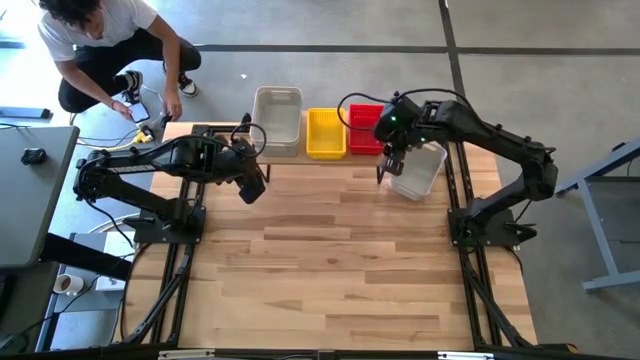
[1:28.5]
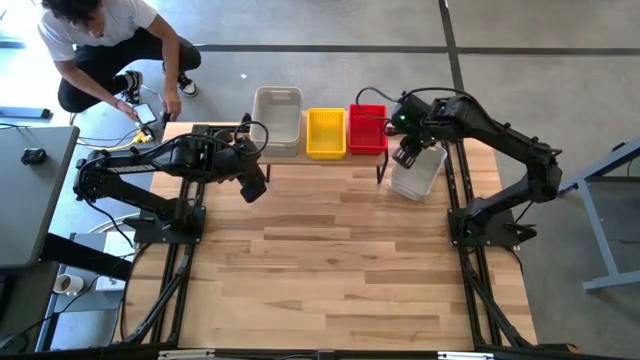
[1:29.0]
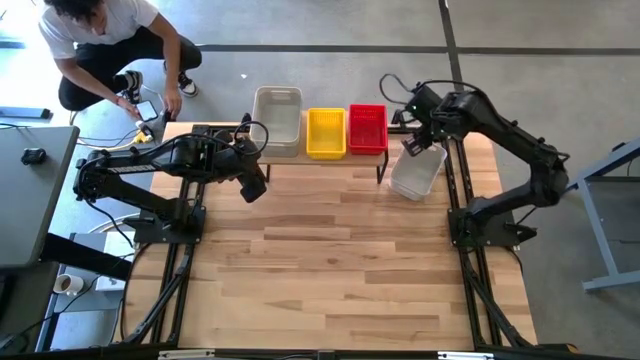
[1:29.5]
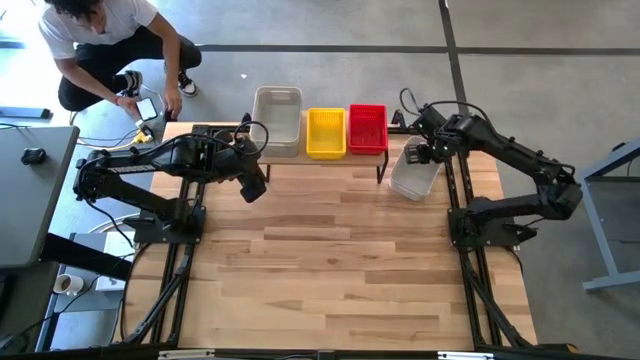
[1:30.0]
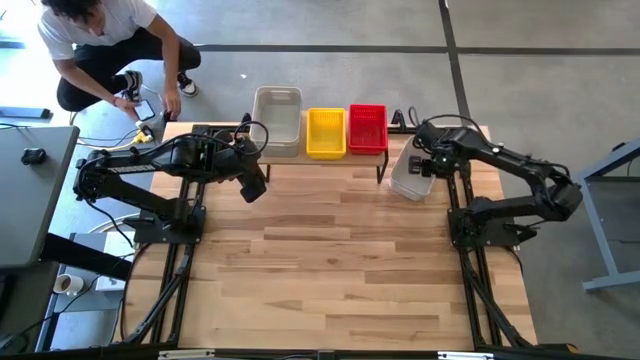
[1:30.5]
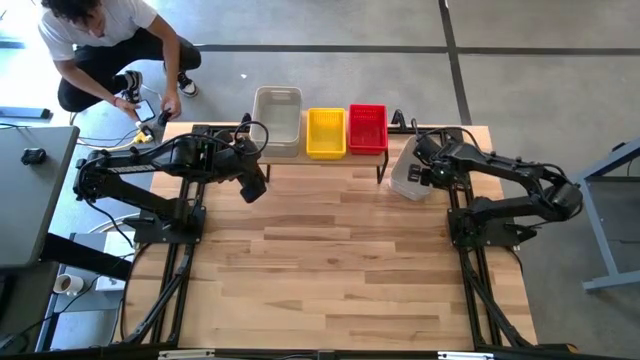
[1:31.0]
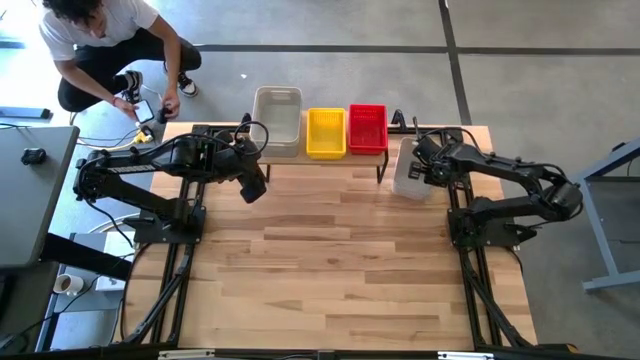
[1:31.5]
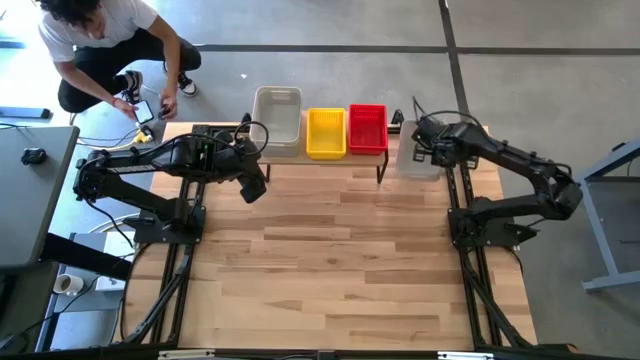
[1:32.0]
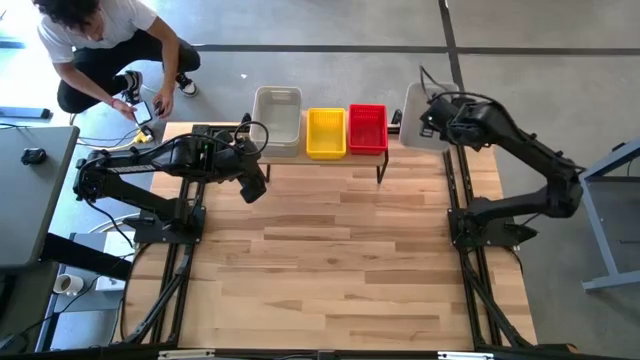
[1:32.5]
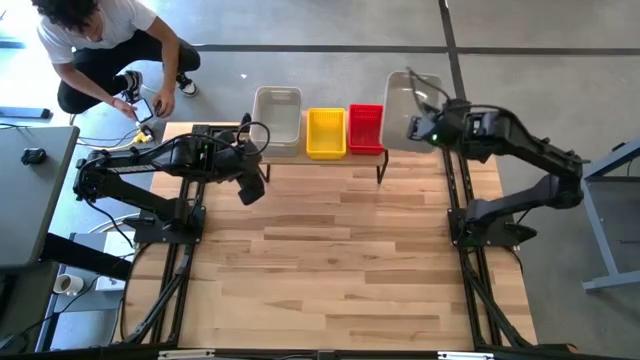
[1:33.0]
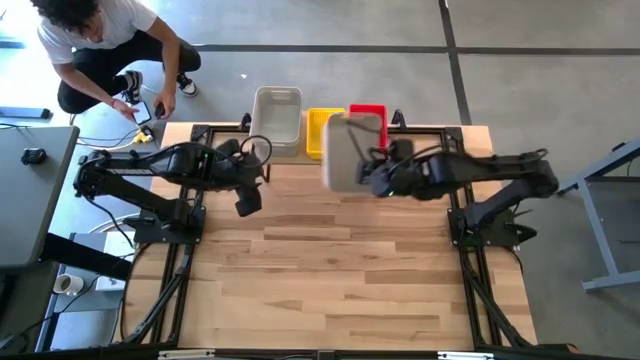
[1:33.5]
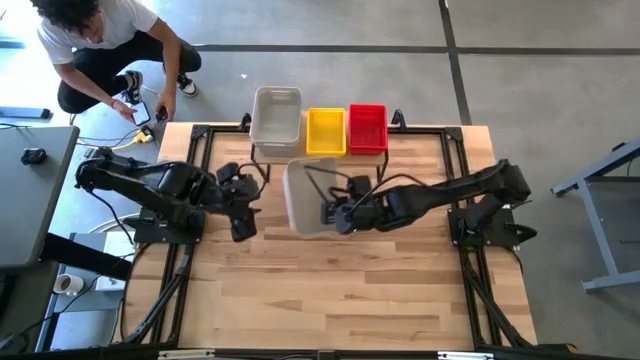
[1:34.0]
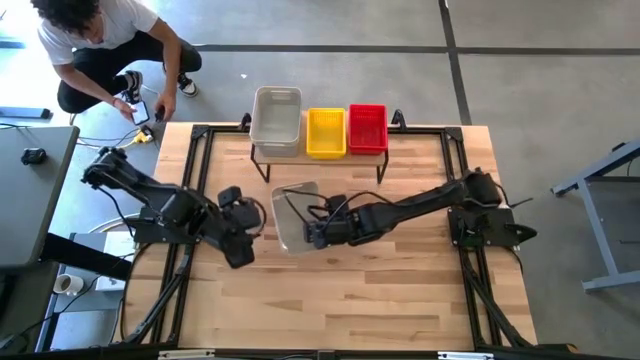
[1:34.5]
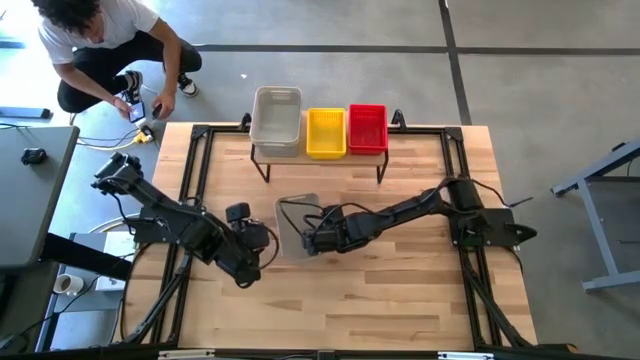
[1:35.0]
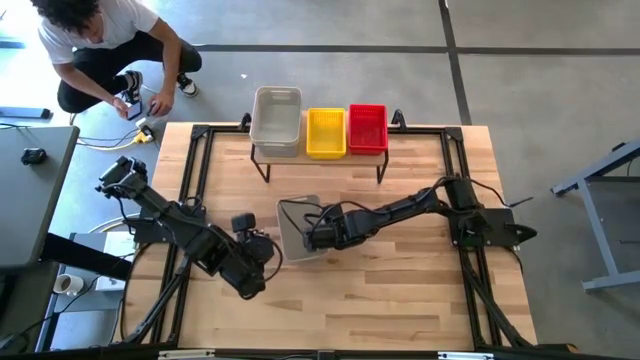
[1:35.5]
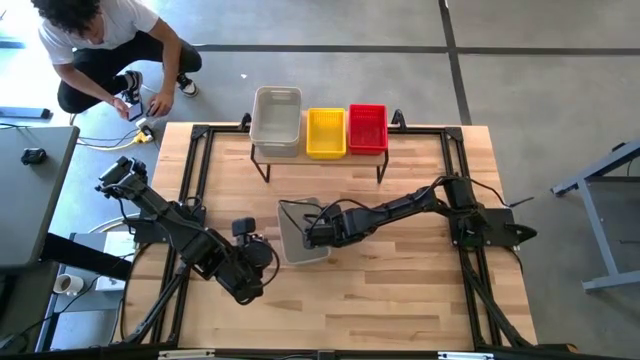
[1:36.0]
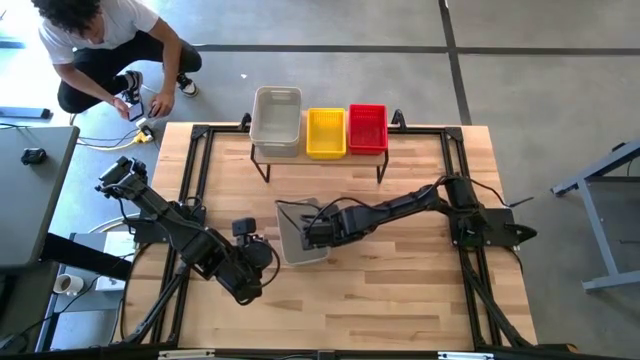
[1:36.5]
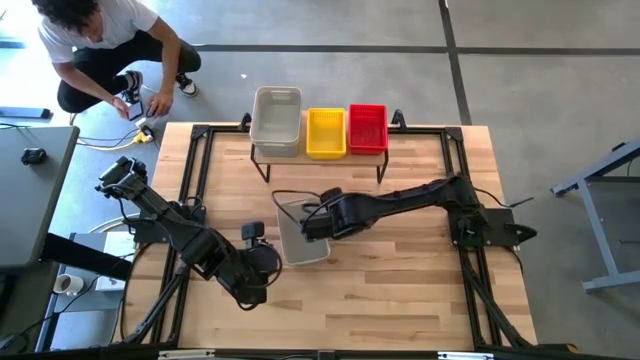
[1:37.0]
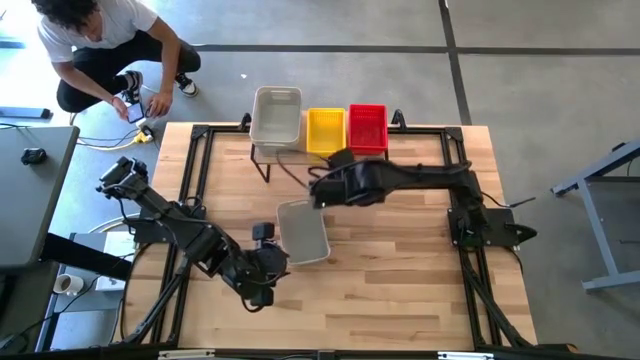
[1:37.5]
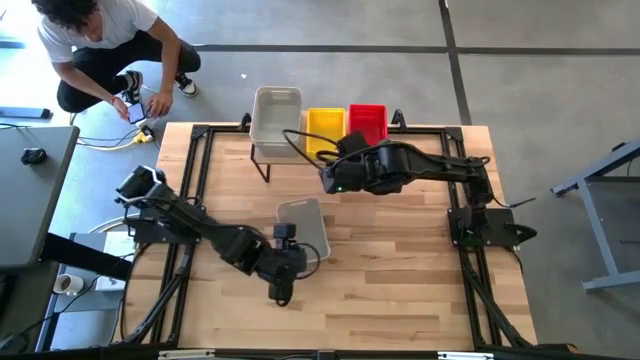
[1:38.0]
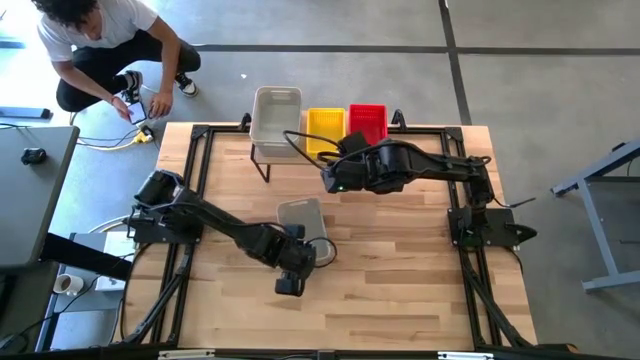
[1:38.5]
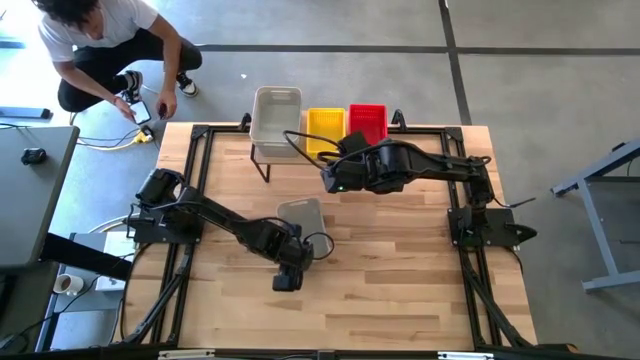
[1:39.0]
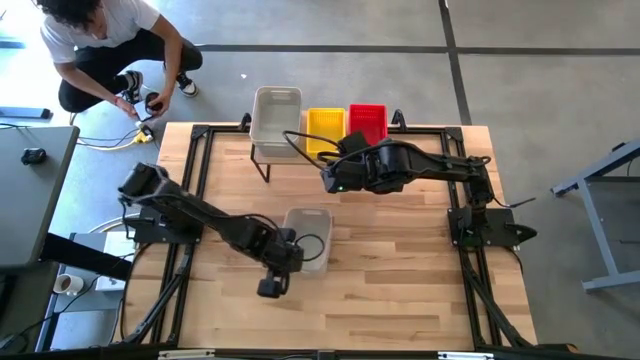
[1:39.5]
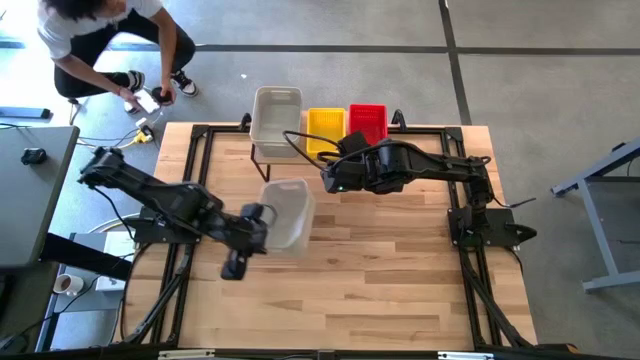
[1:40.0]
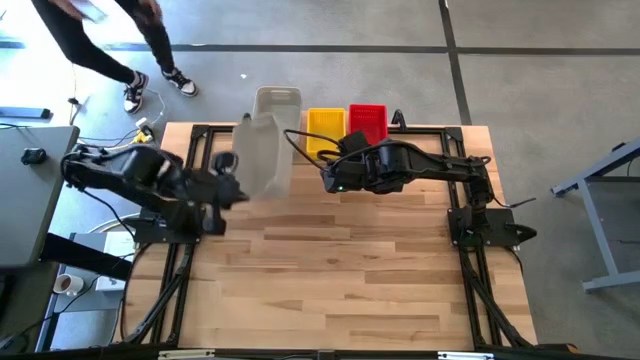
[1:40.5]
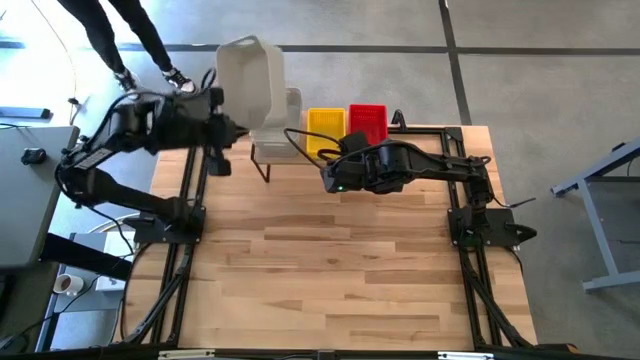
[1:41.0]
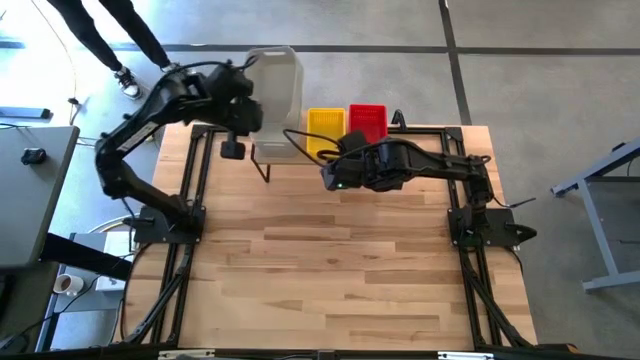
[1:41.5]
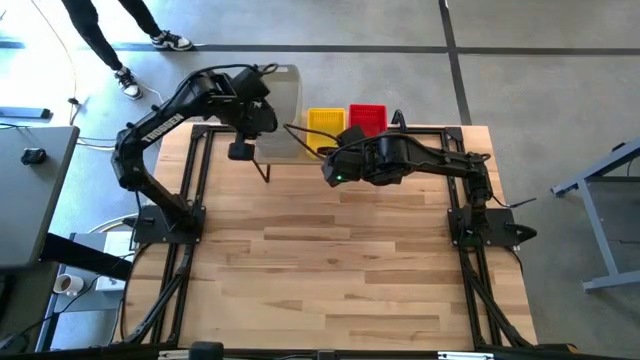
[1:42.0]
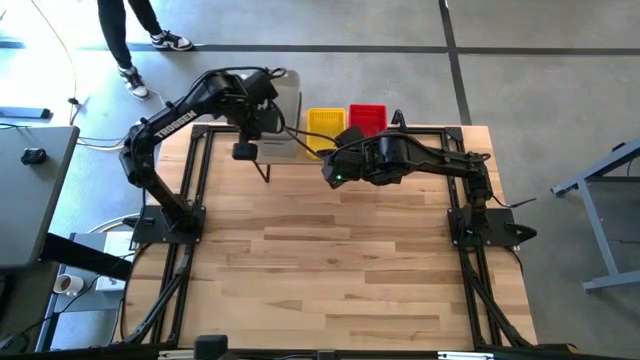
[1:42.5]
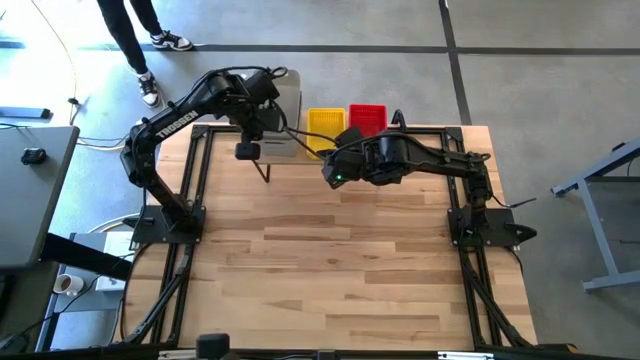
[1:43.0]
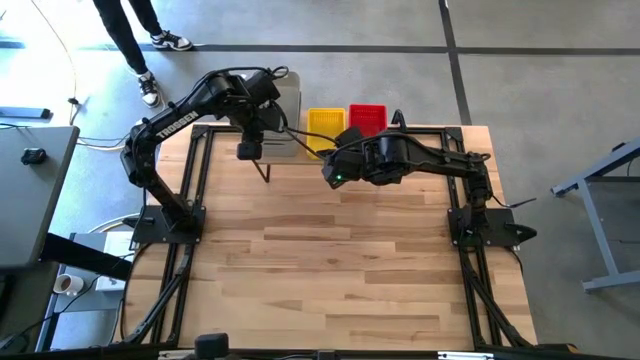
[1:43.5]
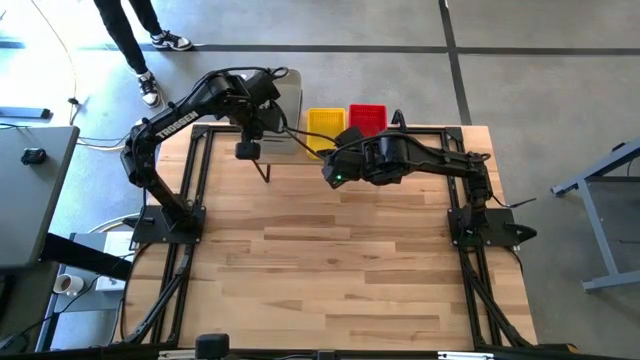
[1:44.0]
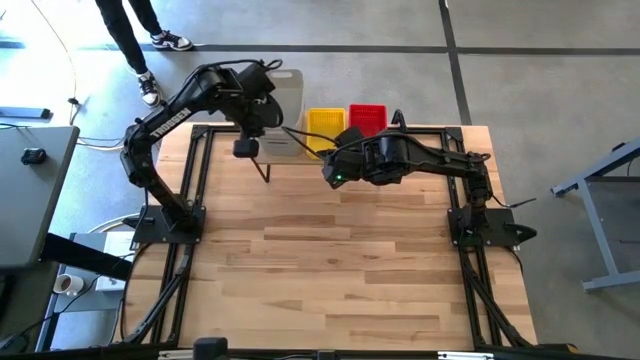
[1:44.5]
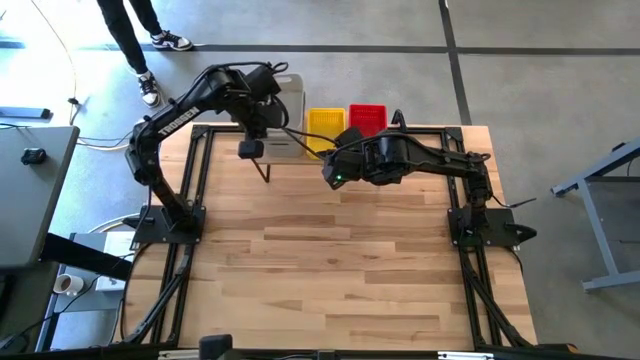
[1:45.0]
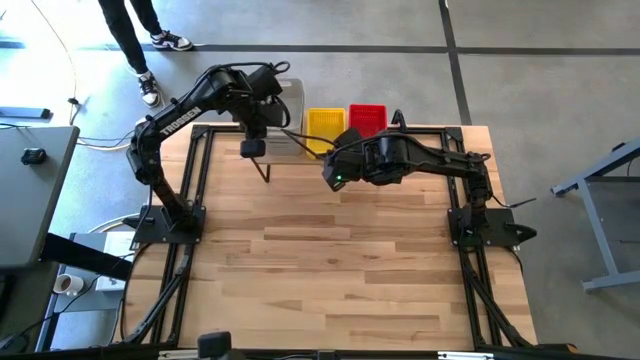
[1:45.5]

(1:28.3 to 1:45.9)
Task: Stack baskets on shelf by color
Stack the gray bin on top of the other gray bin on the shelf

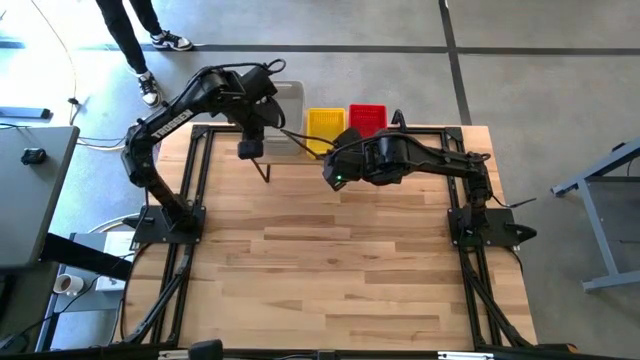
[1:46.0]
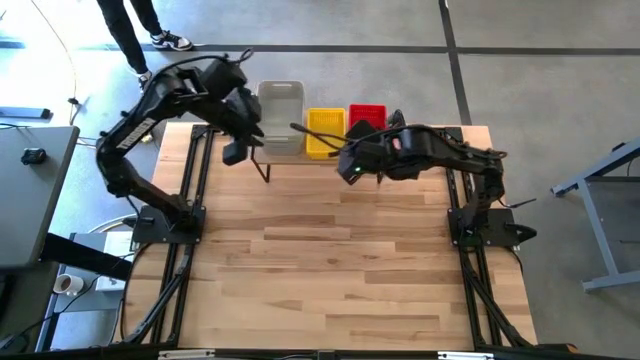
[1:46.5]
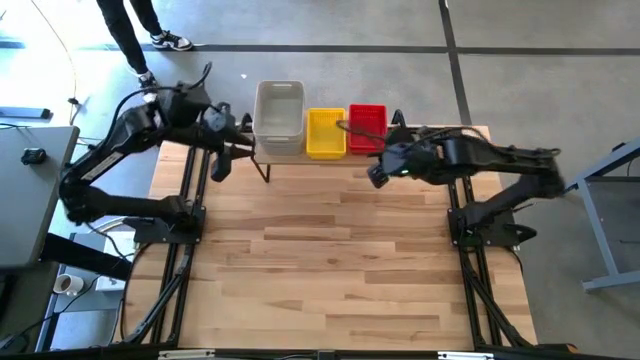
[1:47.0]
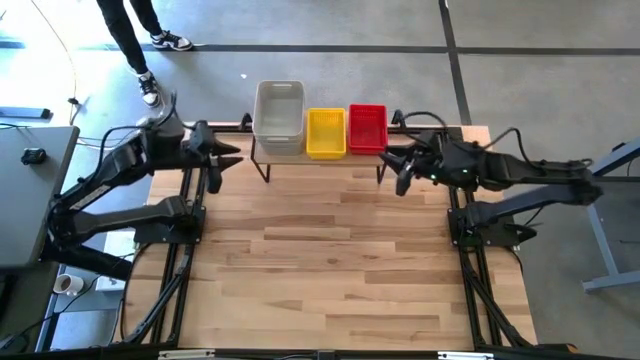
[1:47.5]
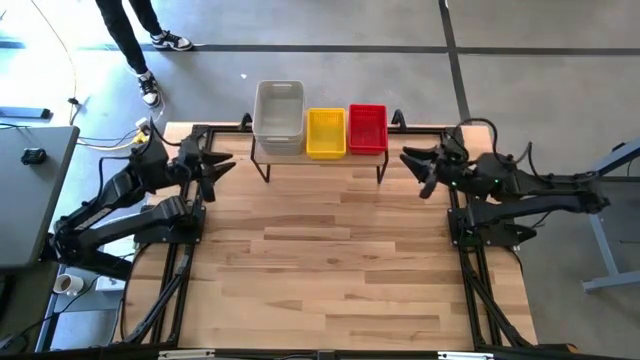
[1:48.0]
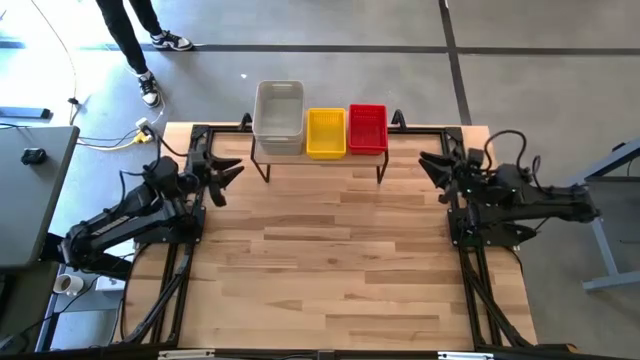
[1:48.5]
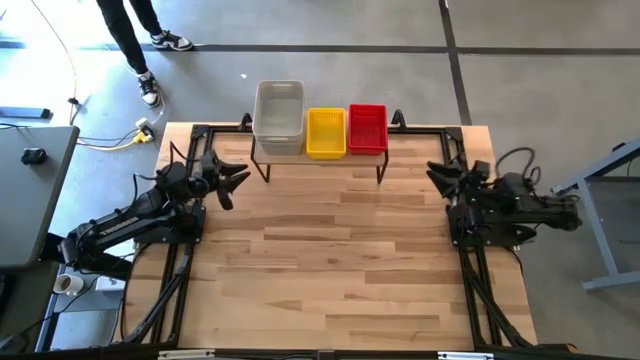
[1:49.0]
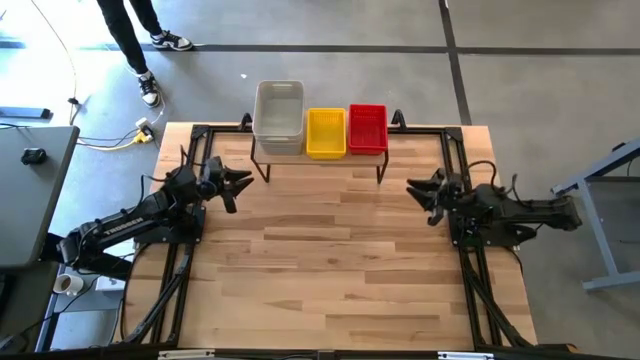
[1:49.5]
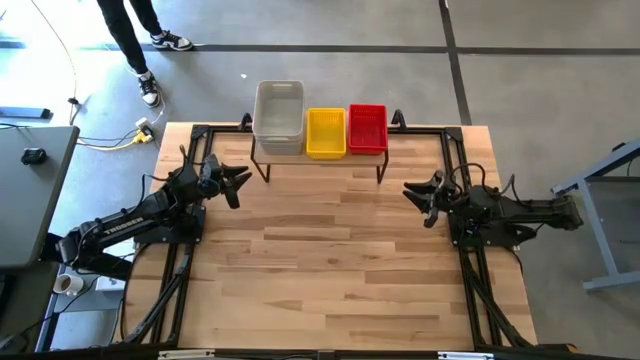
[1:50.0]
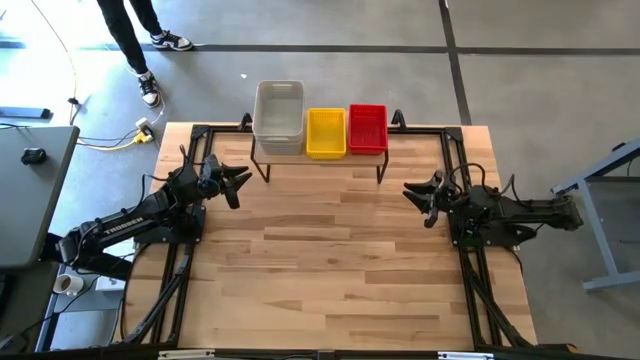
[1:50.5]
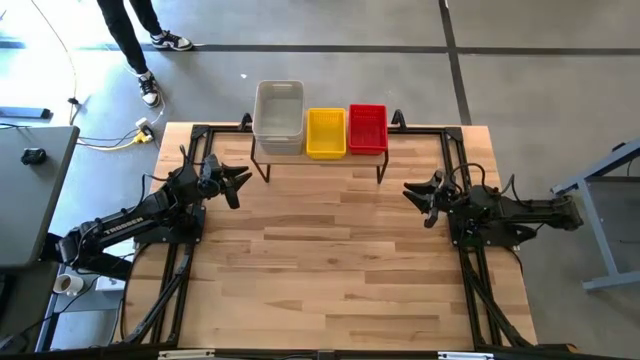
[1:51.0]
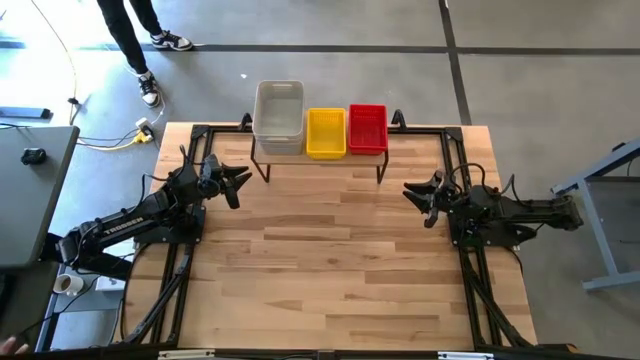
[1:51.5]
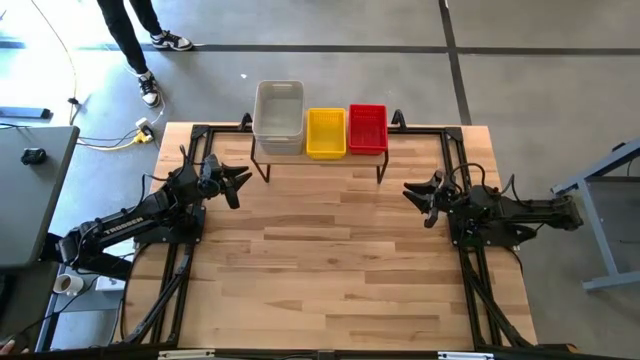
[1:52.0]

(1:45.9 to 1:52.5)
Return to Home Position
